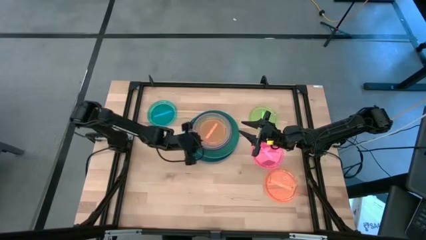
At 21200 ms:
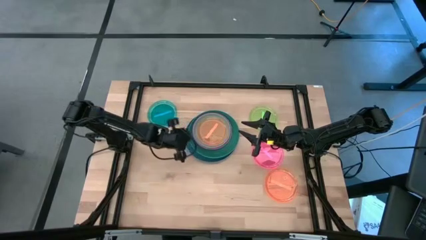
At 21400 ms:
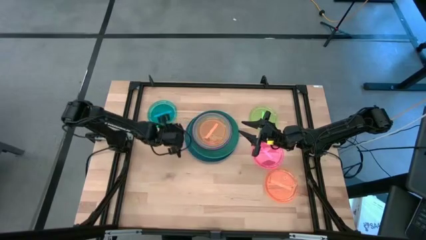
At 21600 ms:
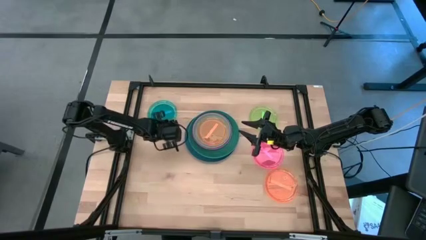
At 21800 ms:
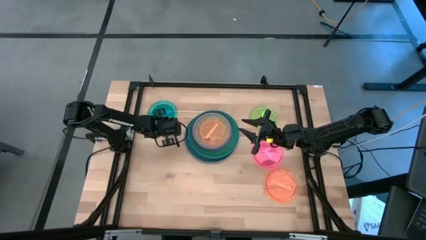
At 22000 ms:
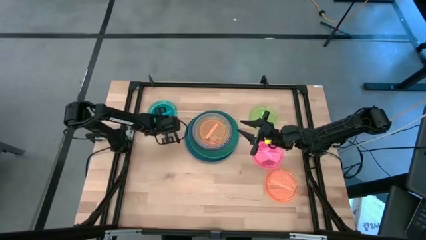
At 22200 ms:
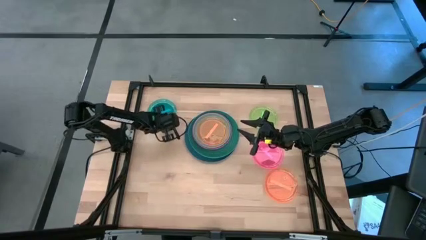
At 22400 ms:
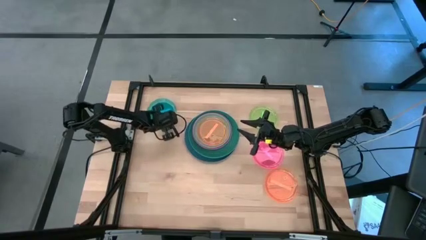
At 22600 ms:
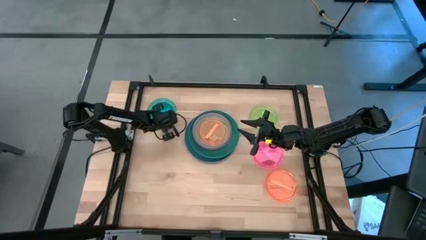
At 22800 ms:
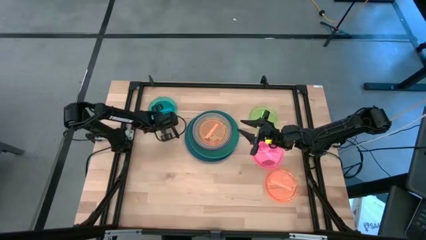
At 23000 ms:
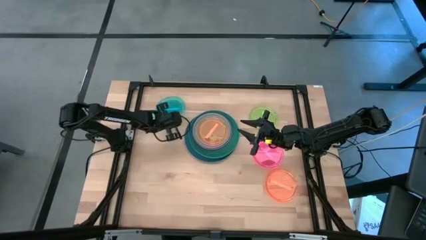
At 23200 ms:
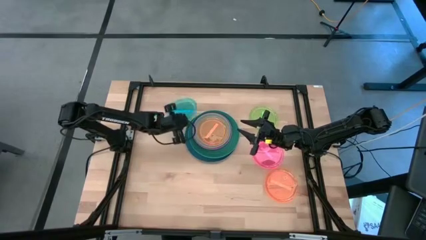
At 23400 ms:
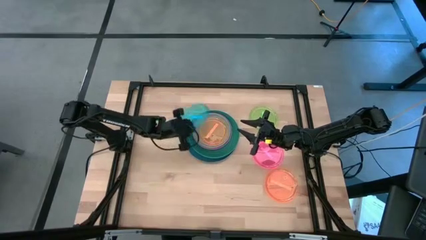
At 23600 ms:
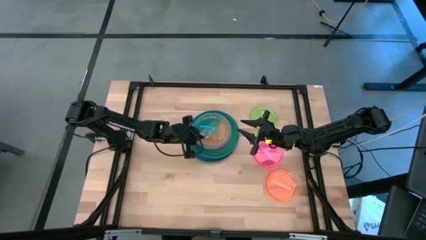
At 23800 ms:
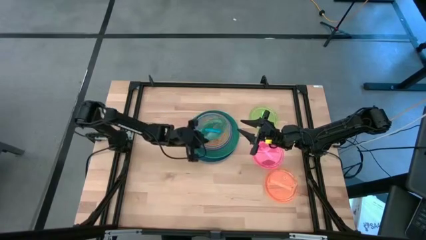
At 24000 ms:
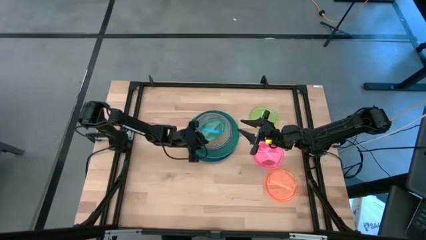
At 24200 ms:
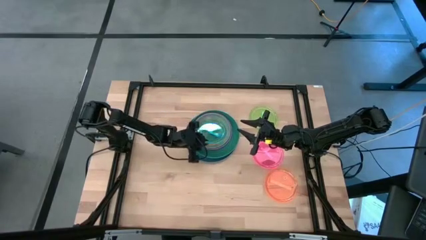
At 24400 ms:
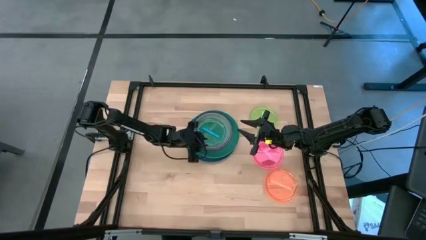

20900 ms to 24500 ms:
Task: Stack plastic plates
Stack the blue plate on top of the orange plate

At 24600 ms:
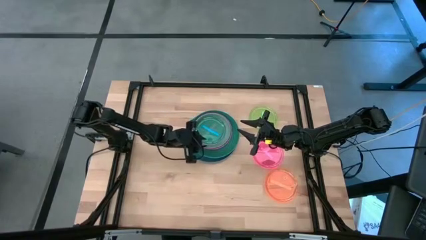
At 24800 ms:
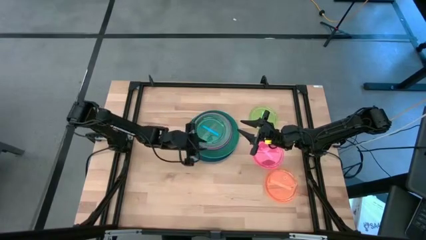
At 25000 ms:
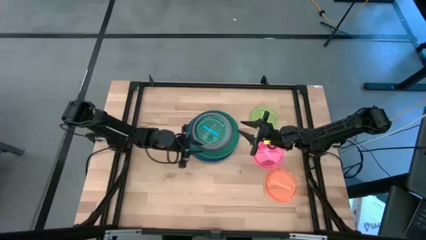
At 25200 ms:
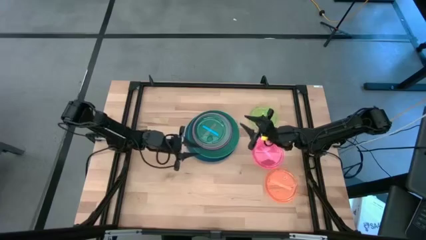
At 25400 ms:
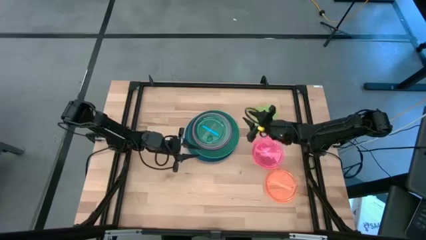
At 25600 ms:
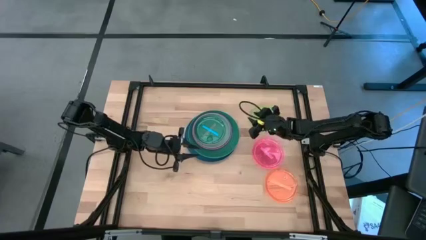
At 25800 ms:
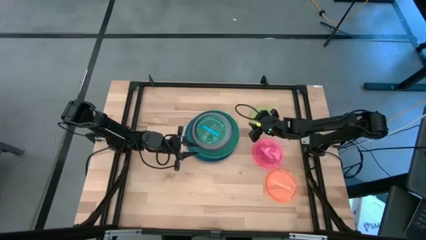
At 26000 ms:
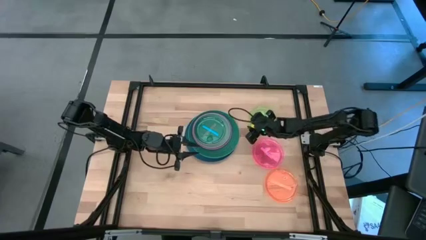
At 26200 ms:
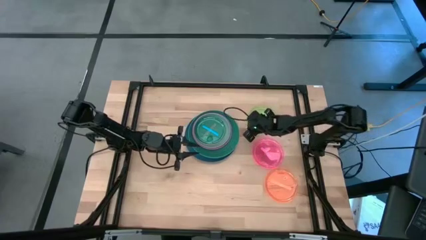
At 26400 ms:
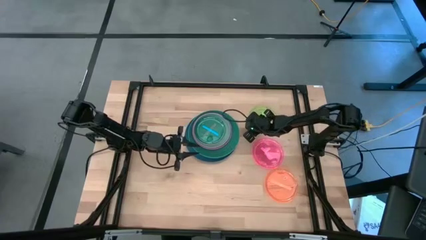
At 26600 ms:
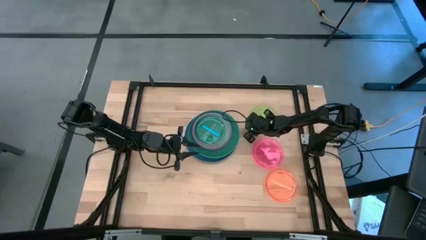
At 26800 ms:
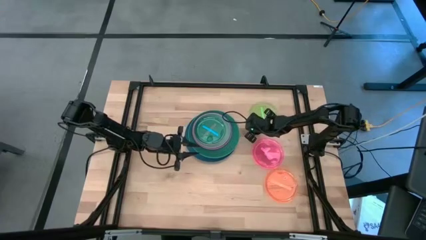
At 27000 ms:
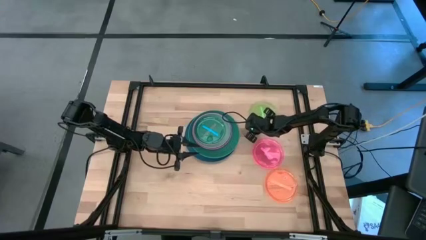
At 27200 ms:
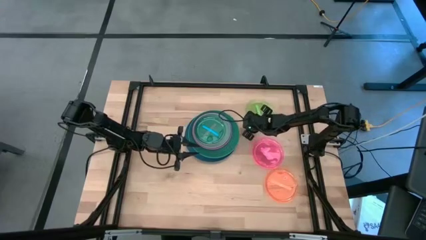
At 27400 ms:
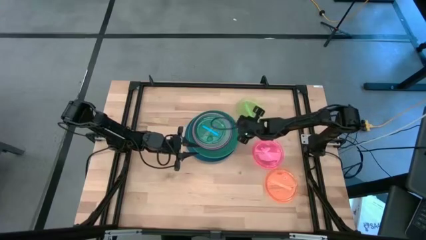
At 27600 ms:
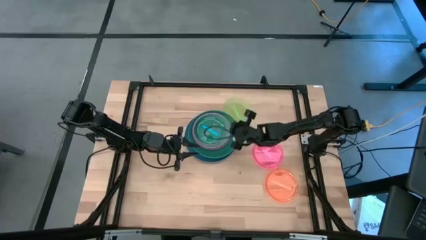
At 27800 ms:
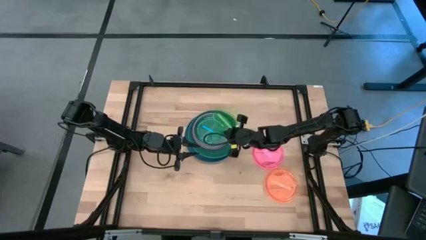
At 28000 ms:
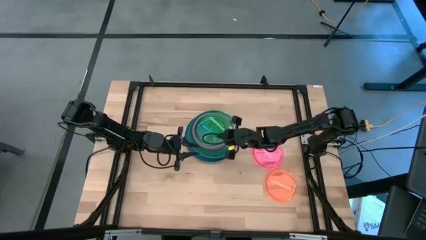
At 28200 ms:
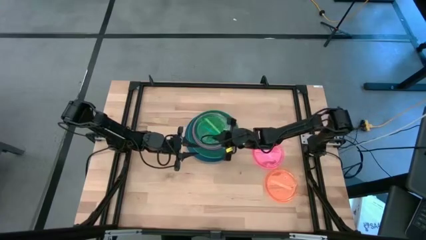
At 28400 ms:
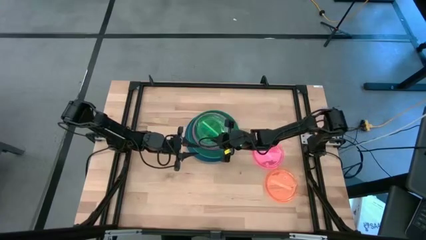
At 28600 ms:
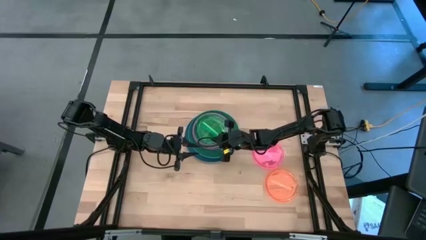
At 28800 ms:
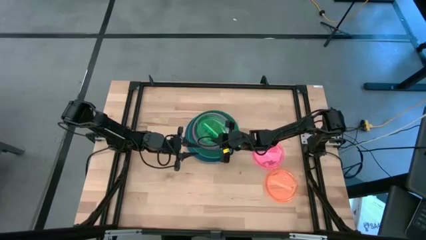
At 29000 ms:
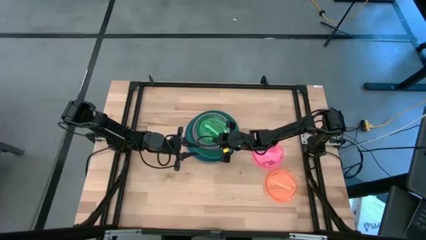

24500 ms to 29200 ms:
Stack the light green plate on top of the blue plate

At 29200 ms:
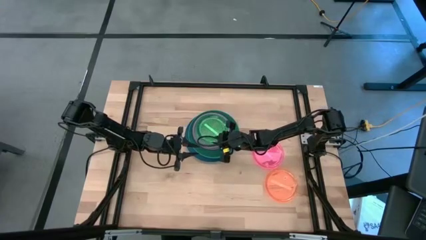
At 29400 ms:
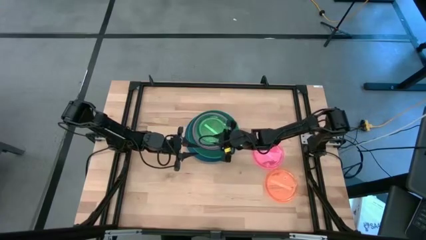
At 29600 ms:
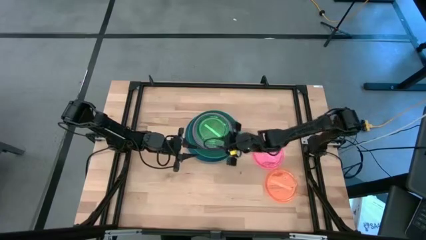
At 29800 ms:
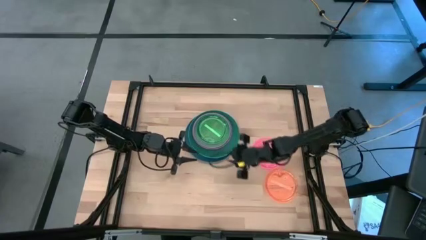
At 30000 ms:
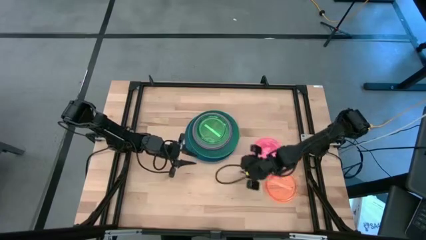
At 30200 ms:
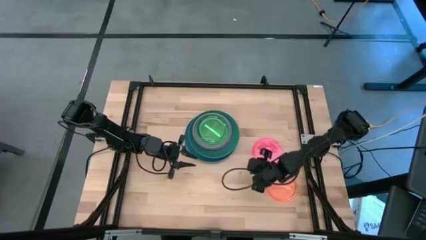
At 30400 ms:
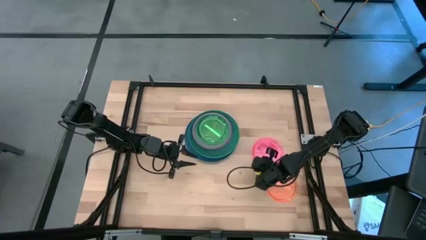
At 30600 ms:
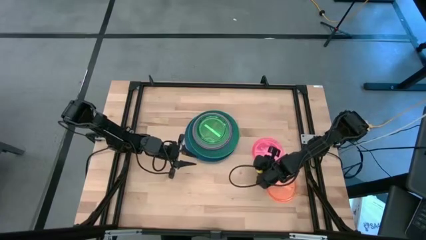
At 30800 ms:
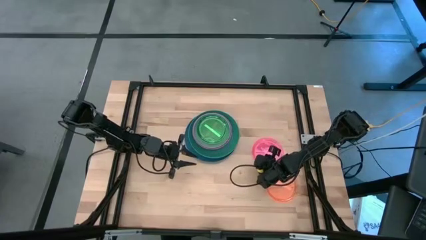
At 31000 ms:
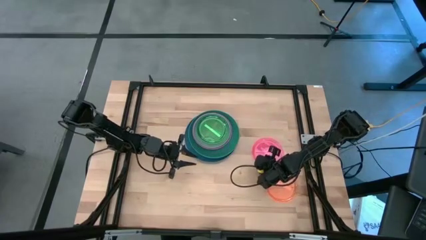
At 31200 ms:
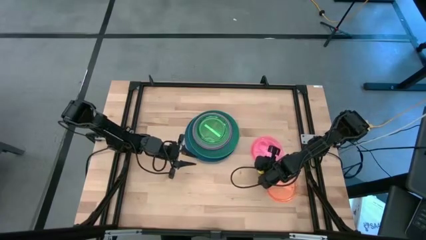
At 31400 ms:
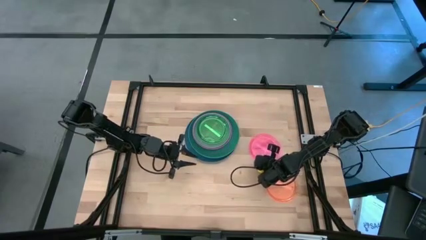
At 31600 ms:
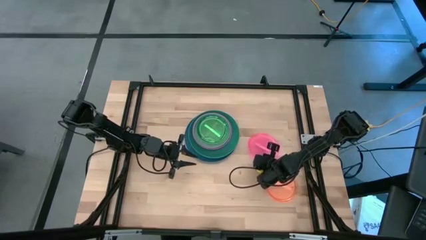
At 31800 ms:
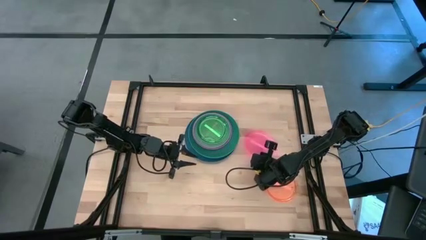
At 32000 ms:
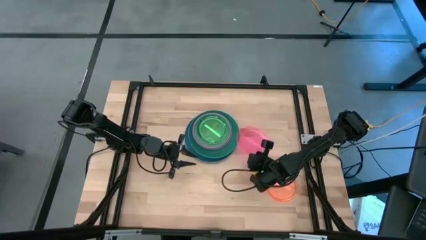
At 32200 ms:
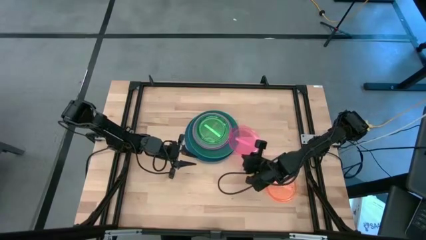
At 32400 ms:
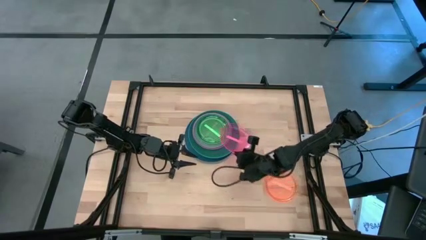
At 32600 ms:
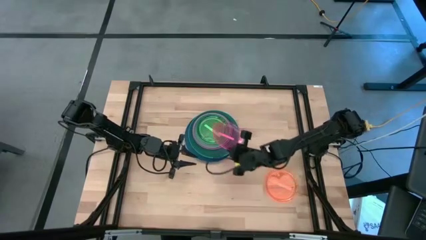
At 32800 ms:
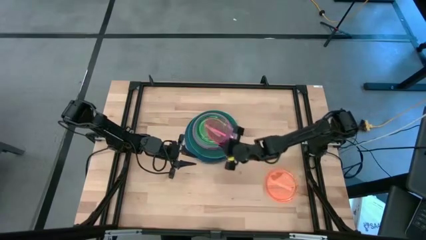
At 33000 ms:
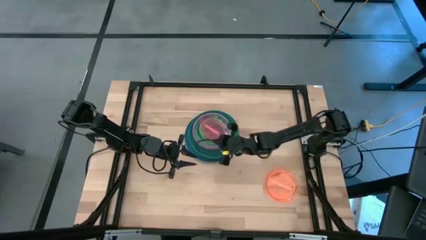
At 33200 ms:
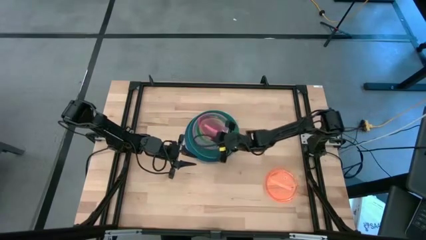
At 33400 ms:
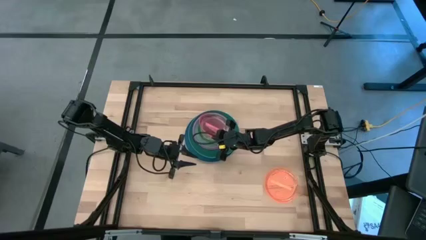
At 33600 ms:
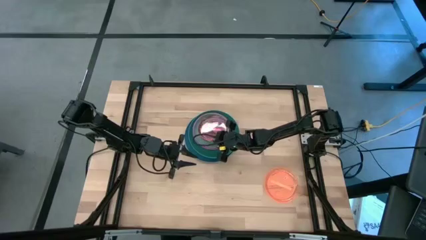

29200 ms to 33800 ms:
Stack the light pink plate on top of the light green plate

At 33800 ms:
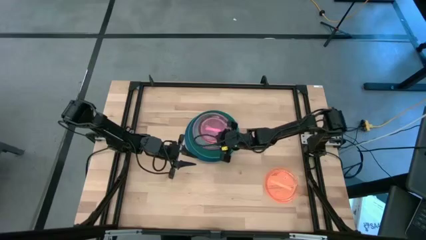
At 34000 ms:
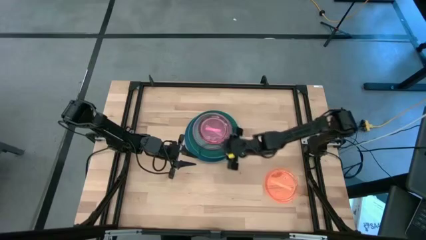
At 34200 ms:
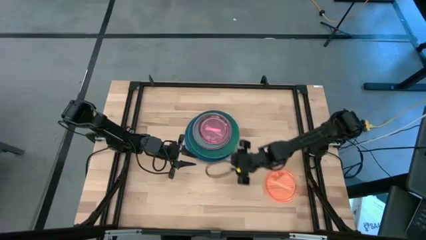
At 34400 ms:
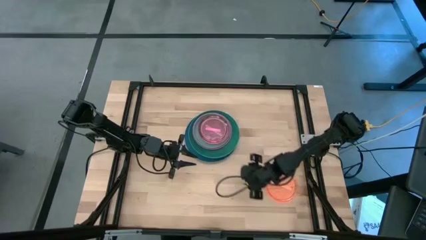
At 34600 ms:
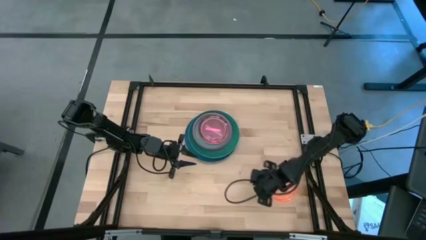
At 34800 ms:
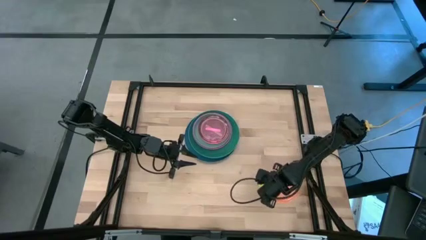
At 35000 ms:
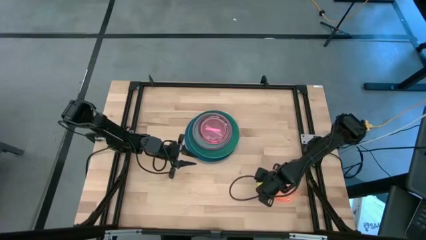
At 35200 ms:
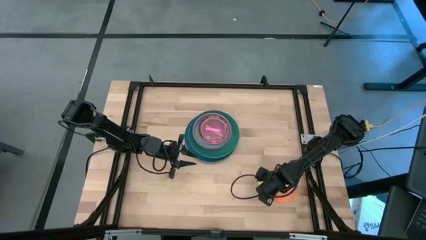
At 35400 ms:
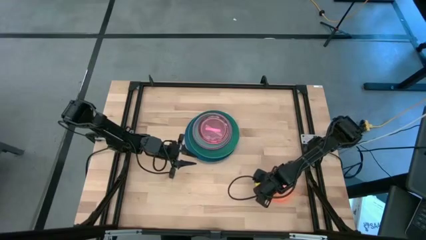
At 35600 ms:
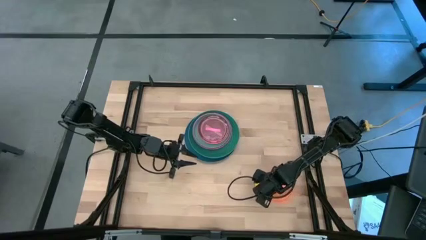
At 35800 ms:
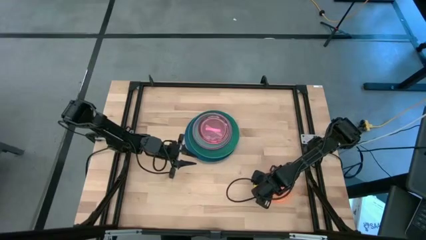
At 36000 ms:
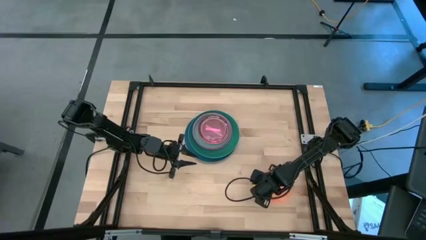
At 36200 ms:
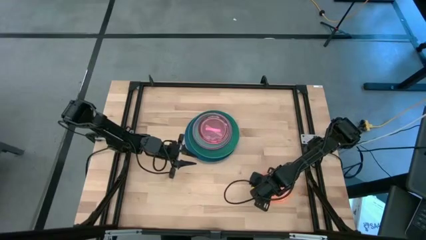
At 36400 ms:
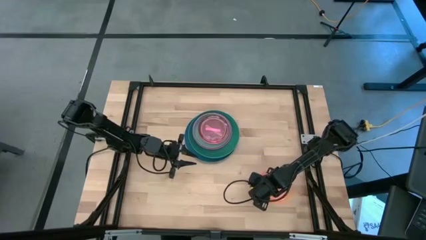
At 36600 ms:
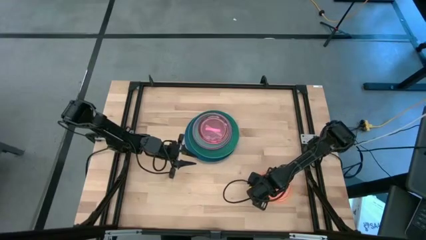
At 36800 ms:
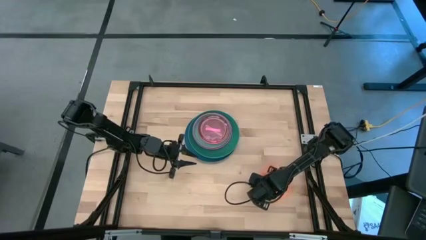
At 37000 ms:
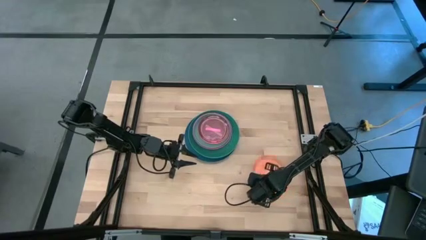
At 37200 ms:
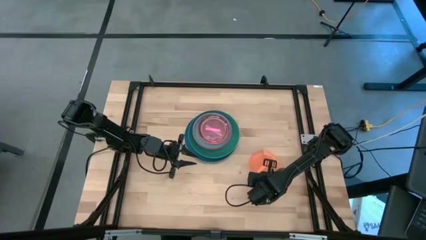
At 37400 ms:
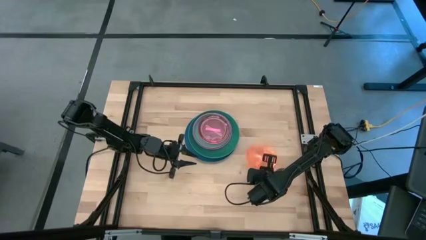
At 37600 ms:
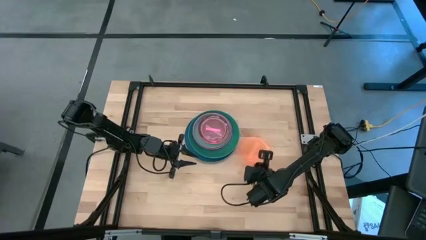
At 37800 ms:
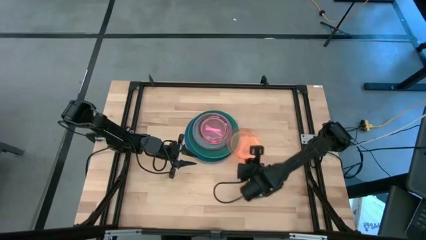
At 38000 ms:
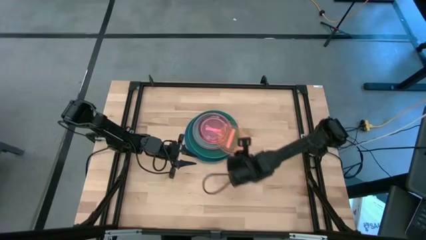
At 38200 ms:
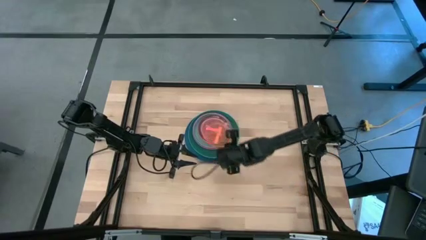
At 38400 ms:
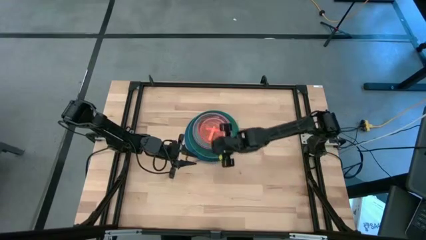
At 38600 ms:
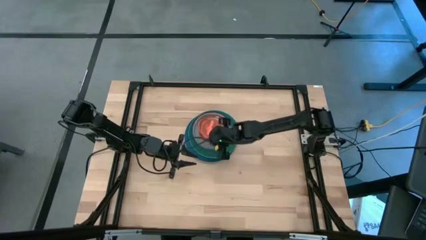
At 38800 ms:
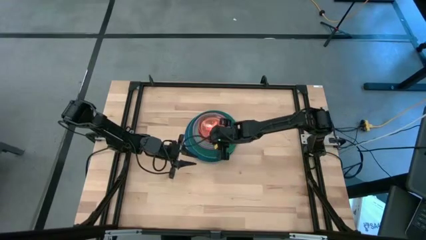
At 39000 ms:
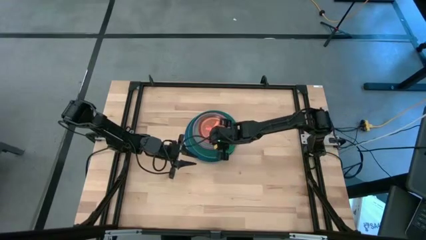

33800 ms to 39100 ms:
Stack the orange plate on top of the light pink plate
